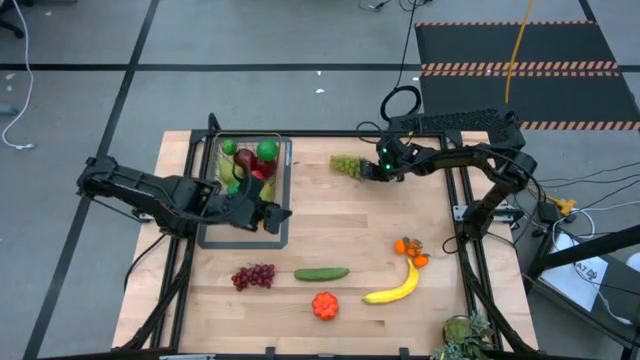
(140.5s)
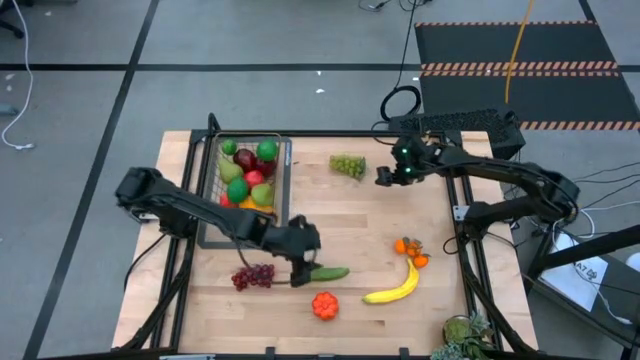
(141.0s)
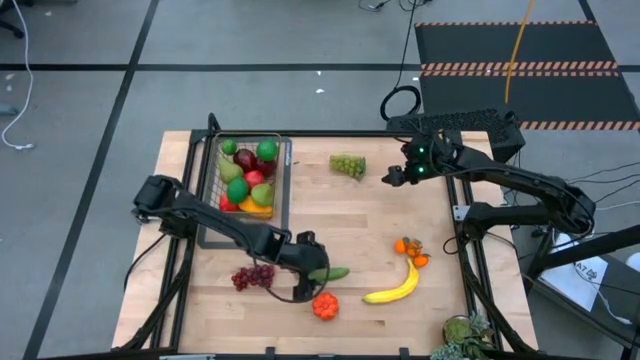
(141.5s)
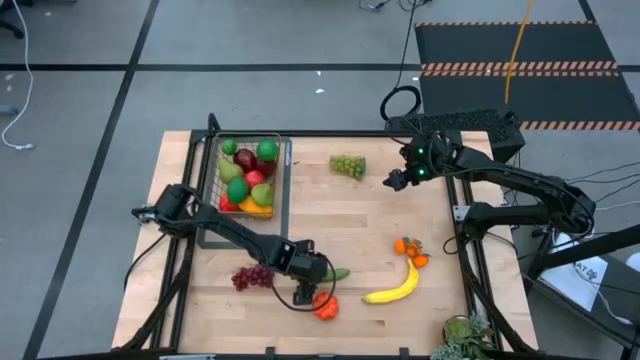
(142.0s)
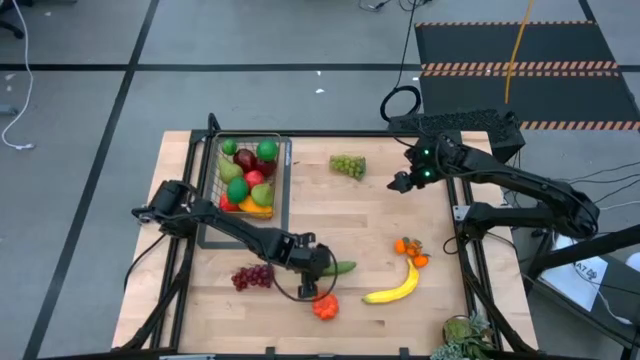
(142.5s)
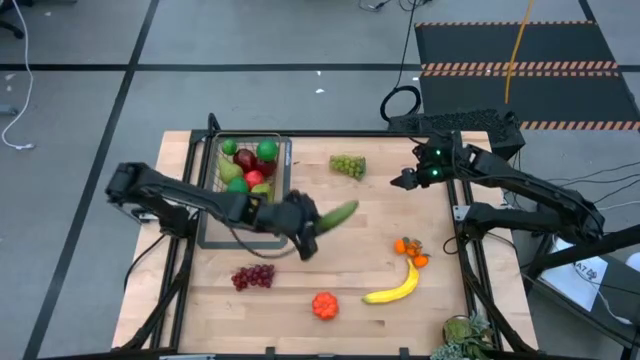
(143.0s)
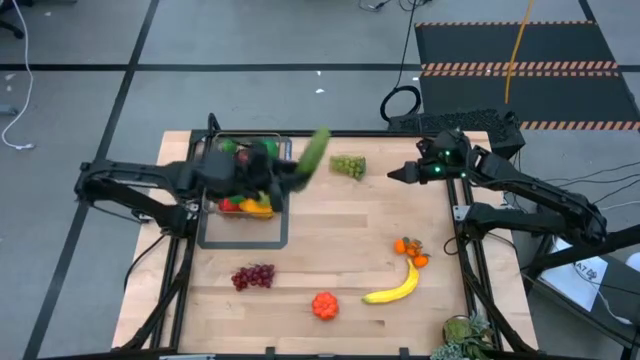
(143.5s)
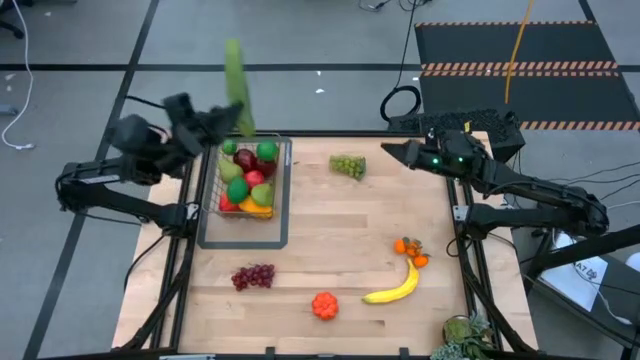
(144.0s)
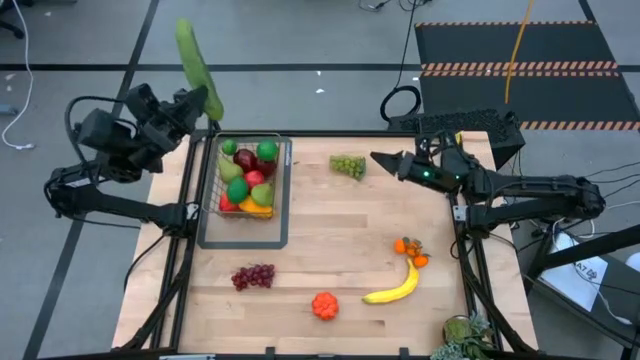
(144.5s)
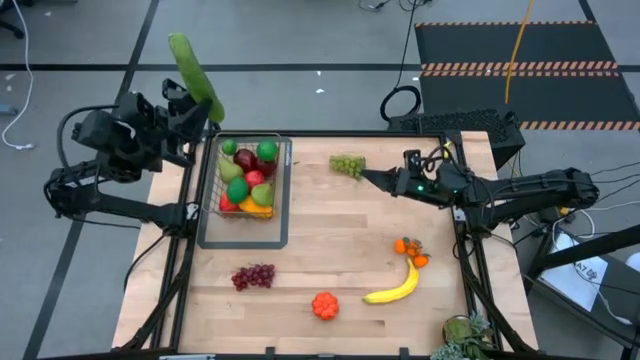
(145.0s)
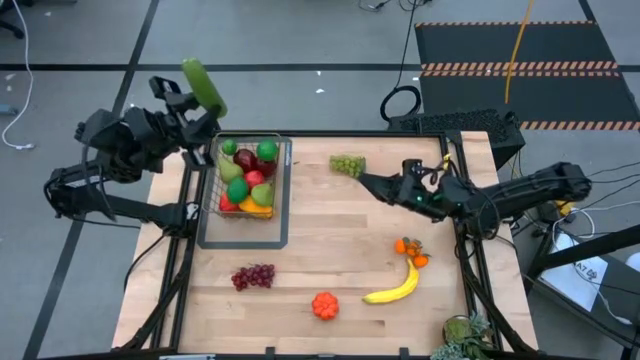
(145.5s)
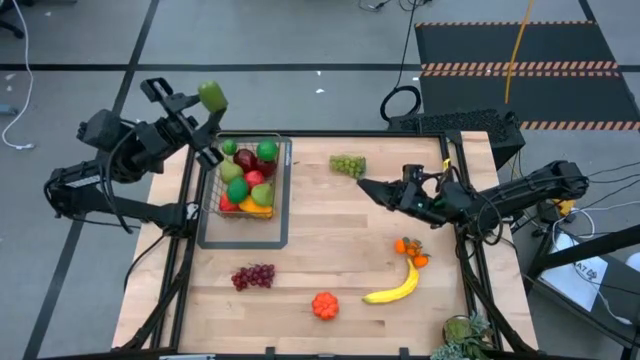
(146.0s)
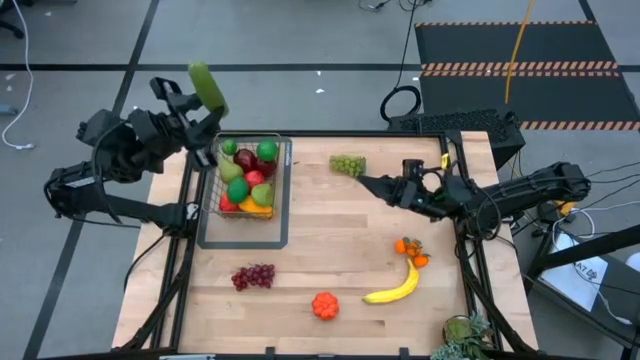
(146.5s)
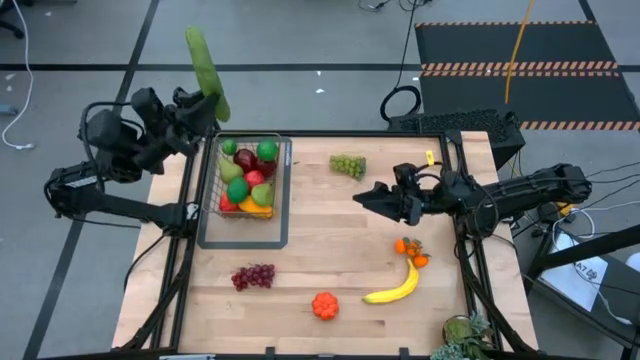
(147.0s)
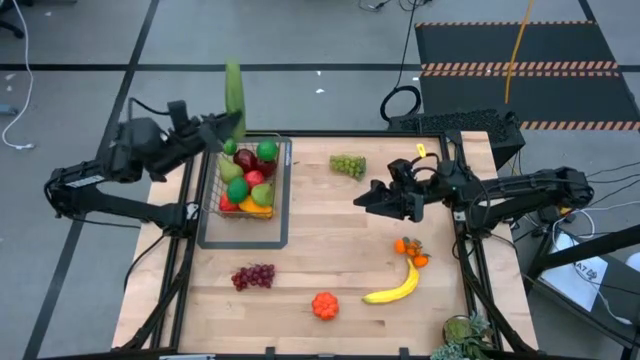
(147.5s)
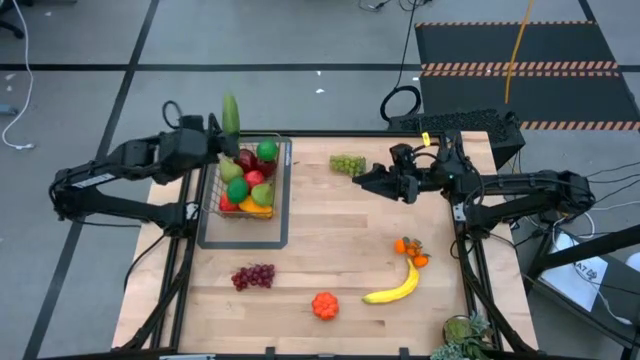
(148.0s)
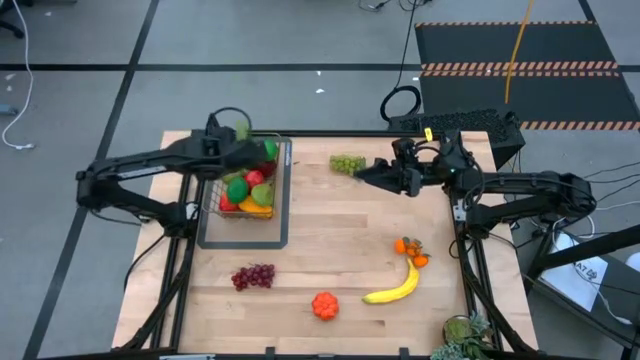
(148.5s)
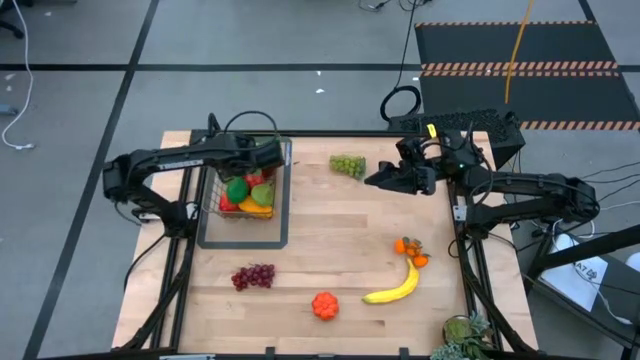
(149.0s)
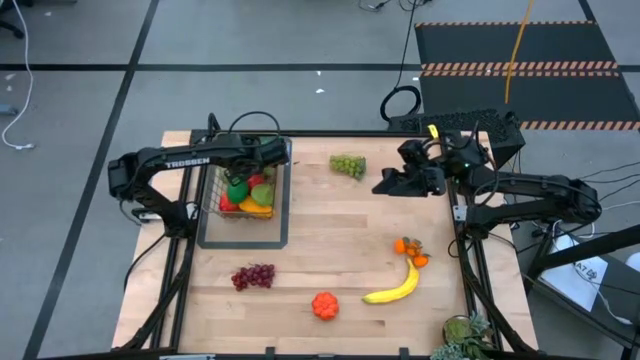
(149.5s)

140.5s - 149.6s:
Task: Build produce basket
Put the cucumber into the wire basket

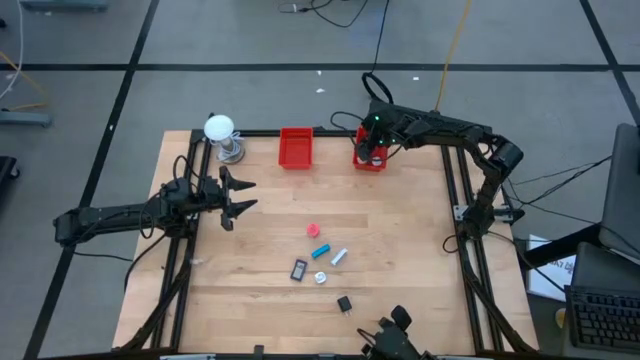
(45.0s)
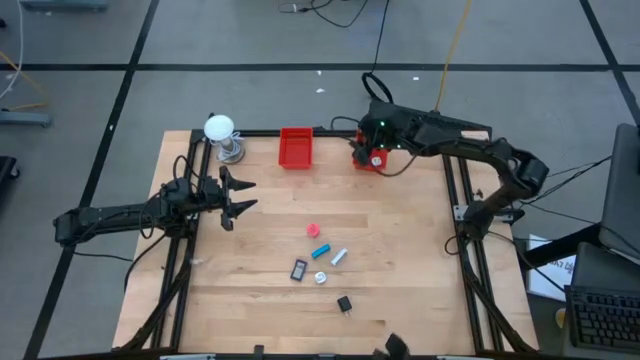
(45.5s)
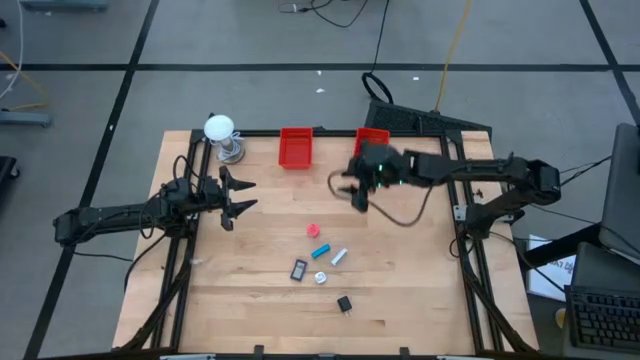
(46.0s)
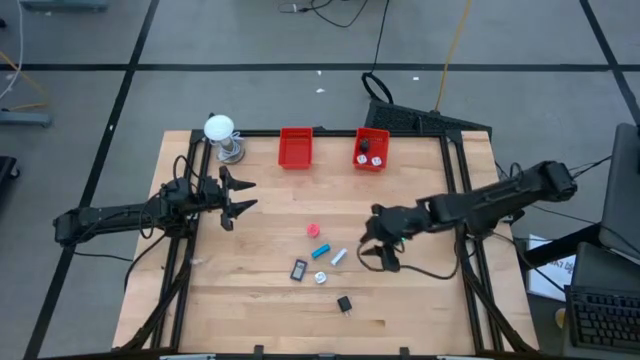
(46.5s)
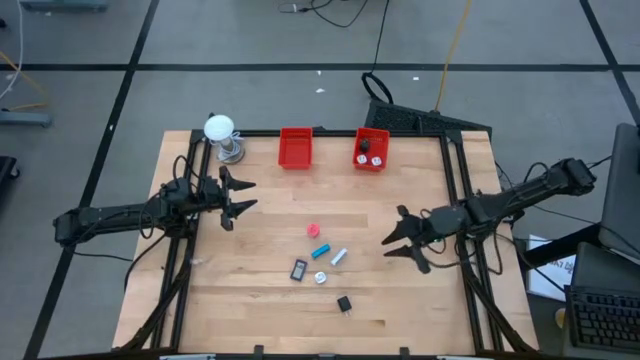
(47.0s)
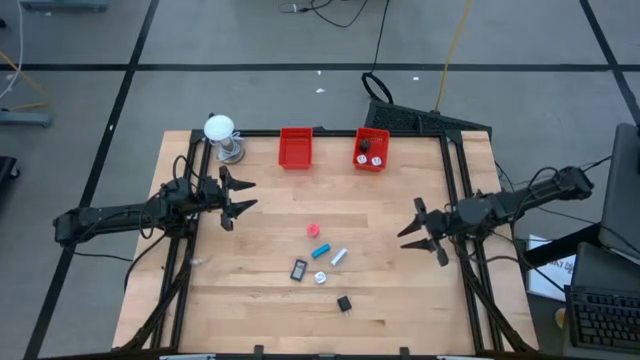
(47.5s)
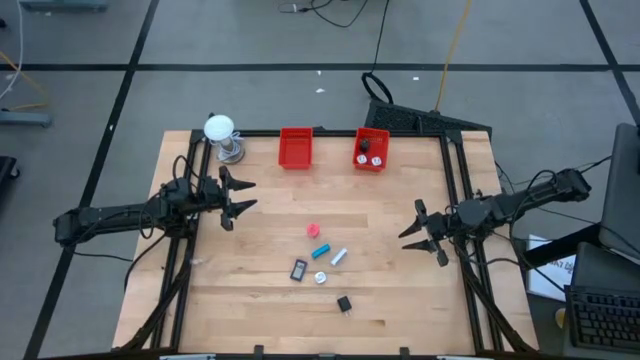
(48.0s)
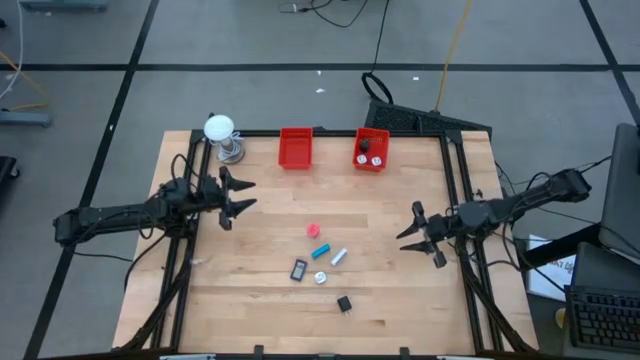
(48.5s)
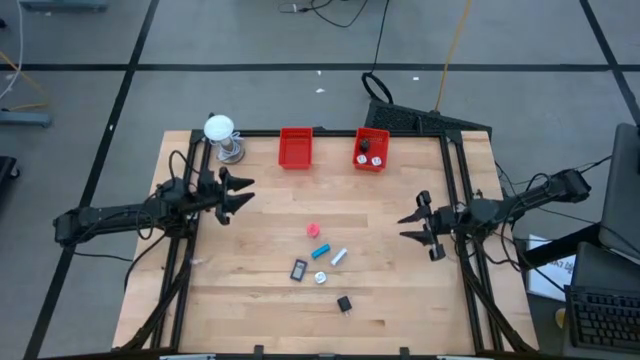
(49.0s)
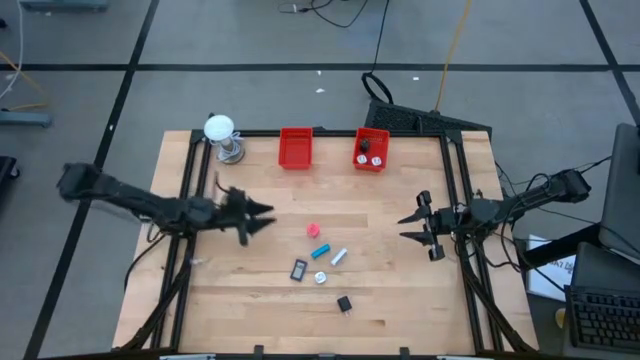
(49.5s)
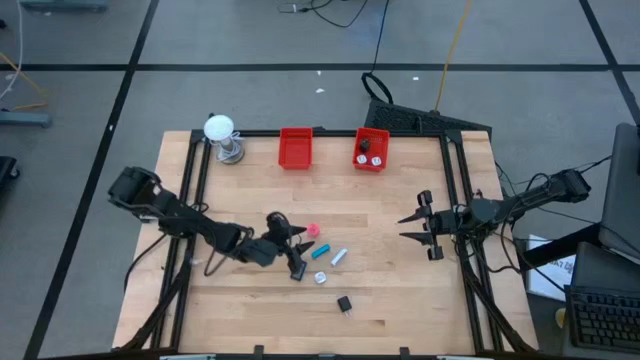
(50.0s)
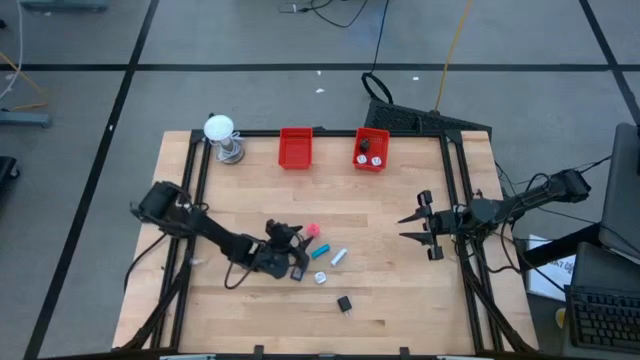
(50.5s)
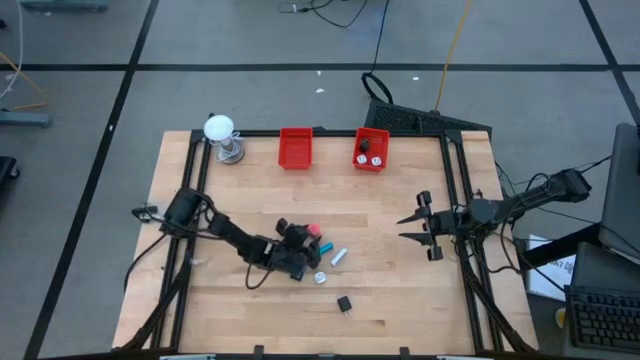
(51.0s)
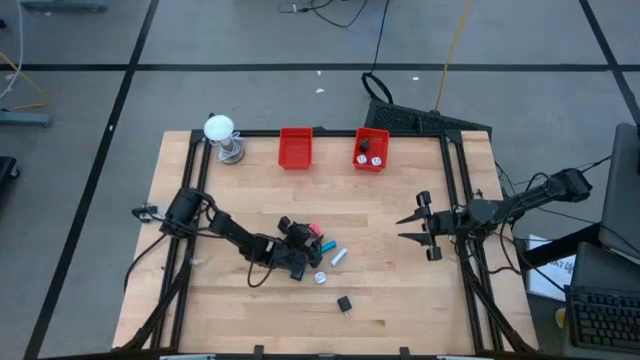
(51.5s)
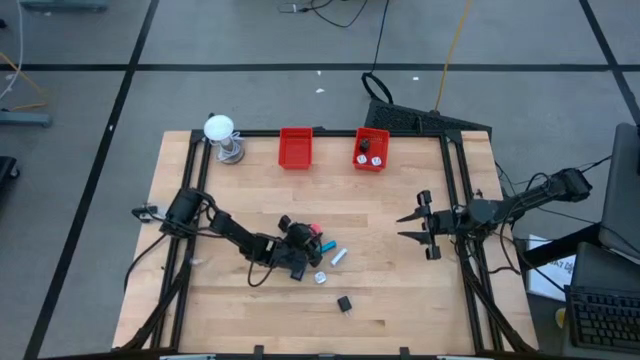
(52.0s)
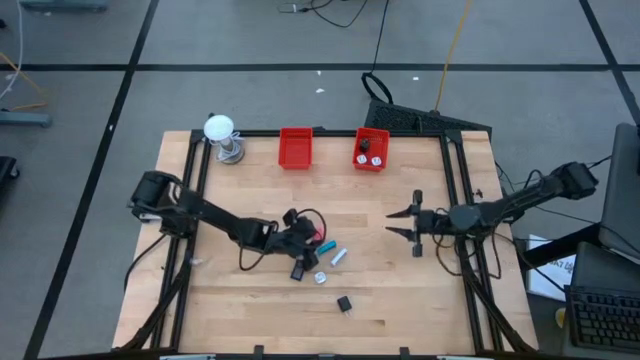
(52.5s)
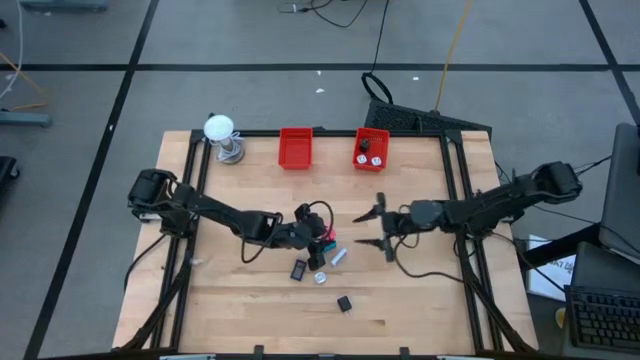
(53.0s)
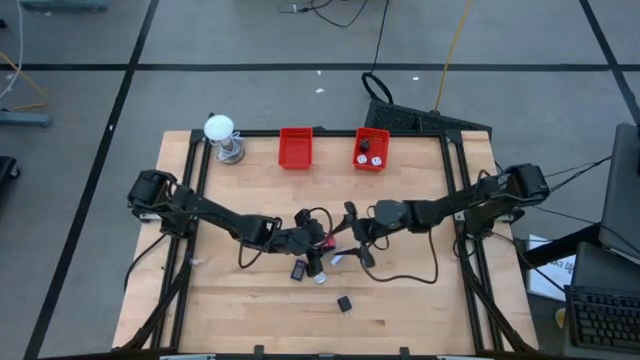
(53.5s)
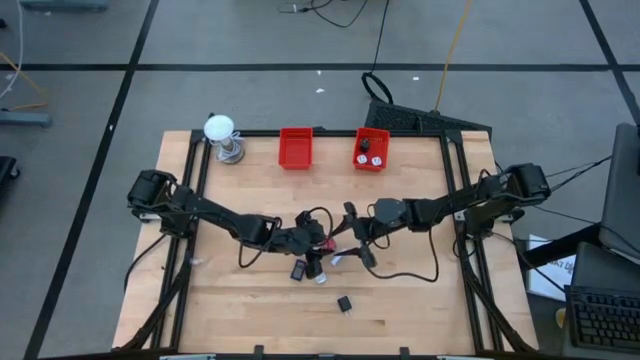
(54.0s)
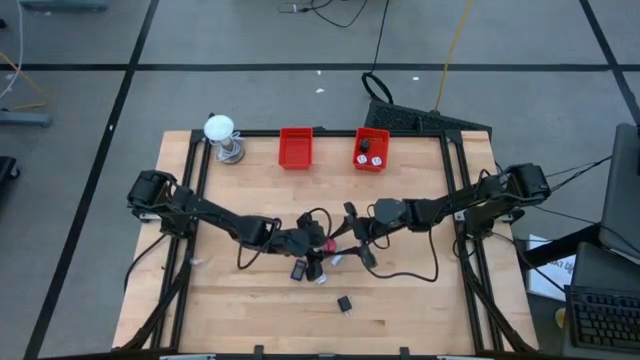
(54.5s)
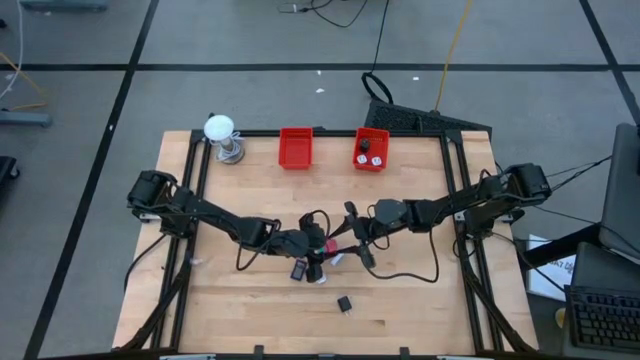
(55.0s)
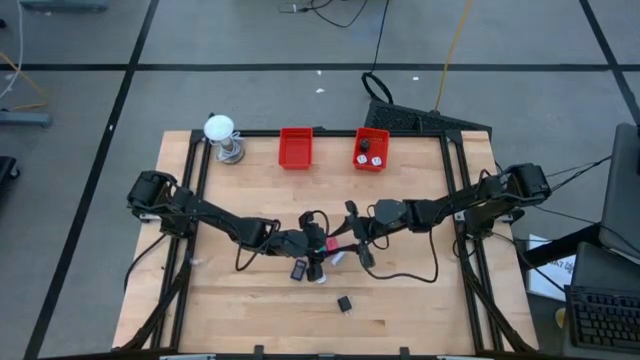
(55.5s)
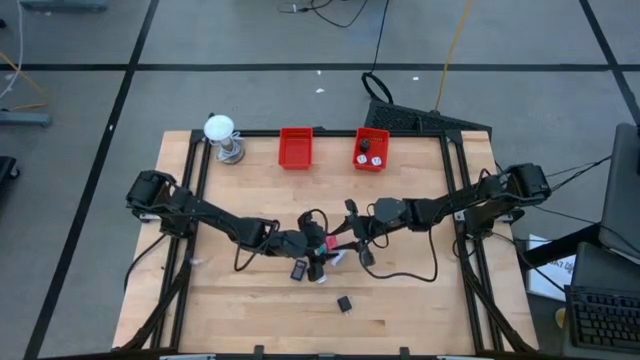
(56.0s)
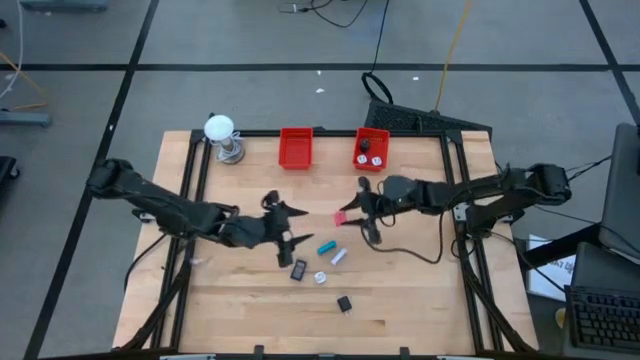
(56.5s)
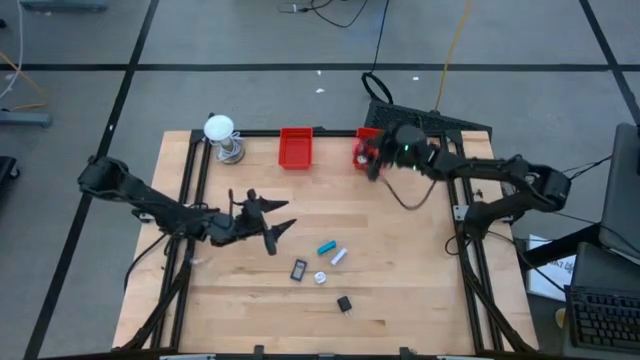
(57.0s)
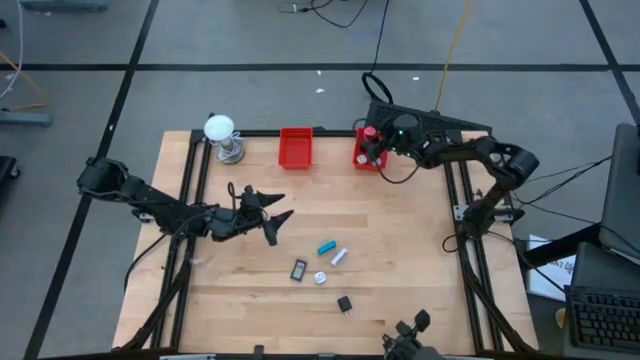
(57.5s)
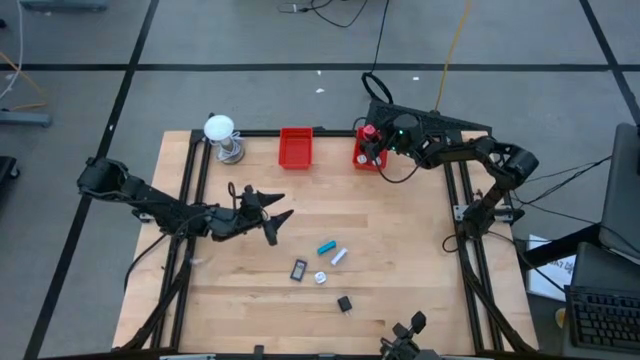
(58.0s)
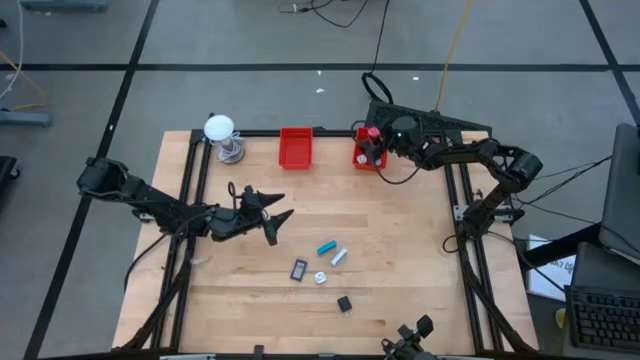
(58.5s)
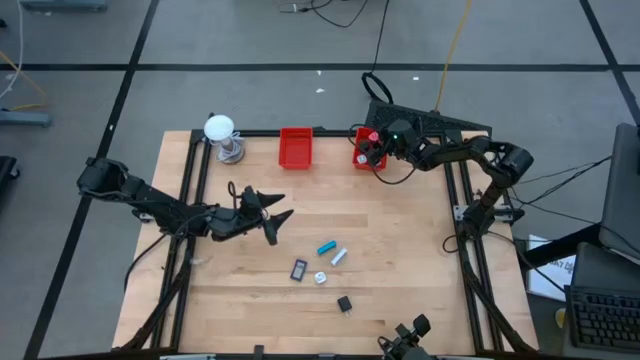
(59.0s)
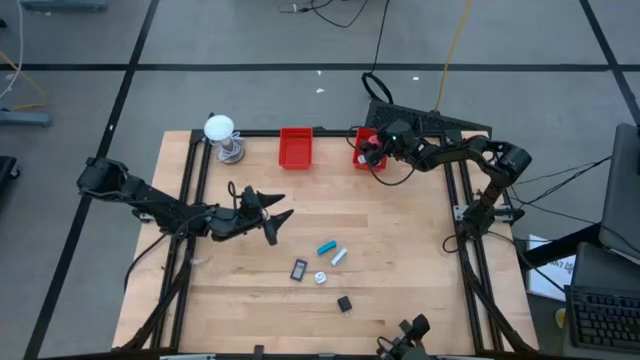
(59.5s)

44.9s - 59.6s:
Task: Pick & Place Office items
Put the pink charger adapter into the right red basket
